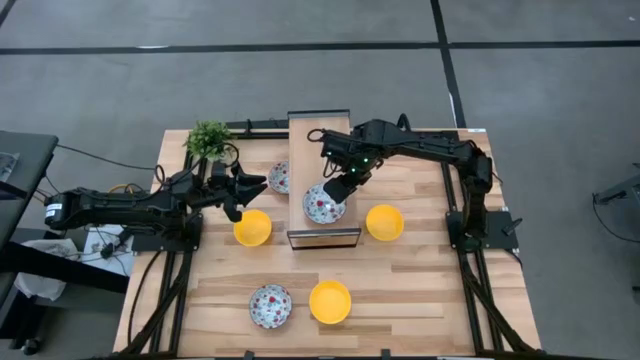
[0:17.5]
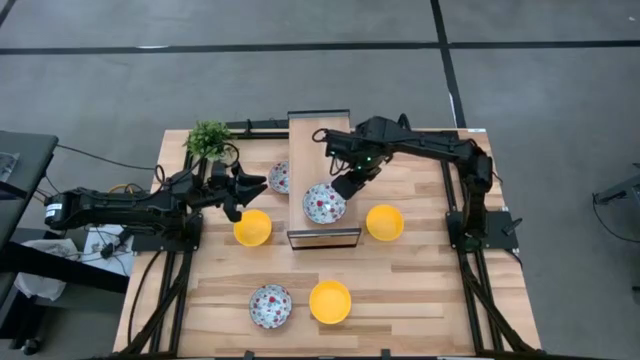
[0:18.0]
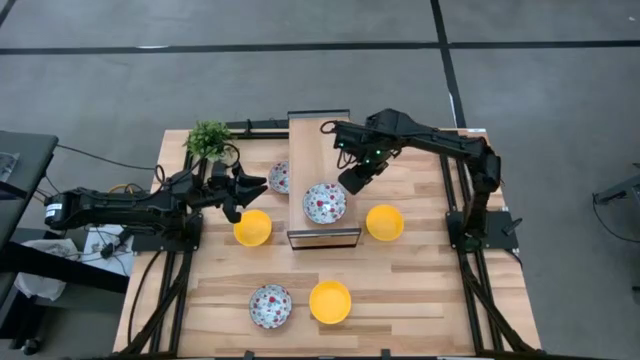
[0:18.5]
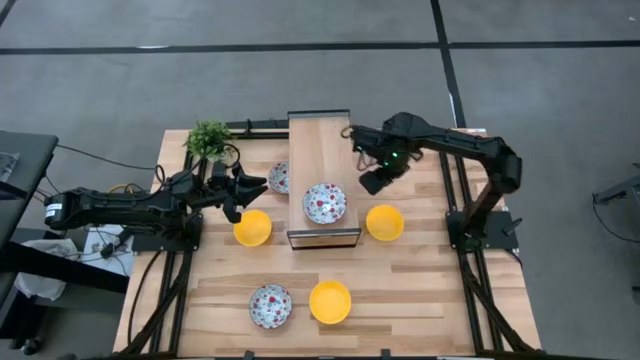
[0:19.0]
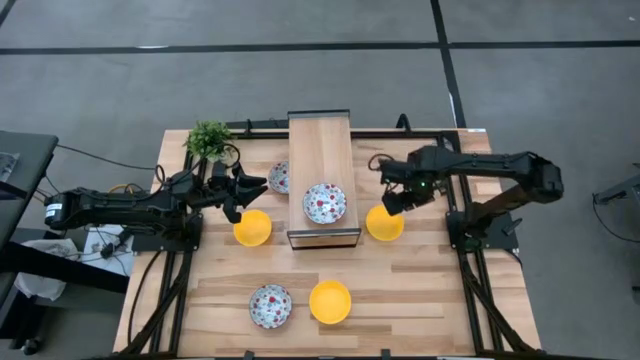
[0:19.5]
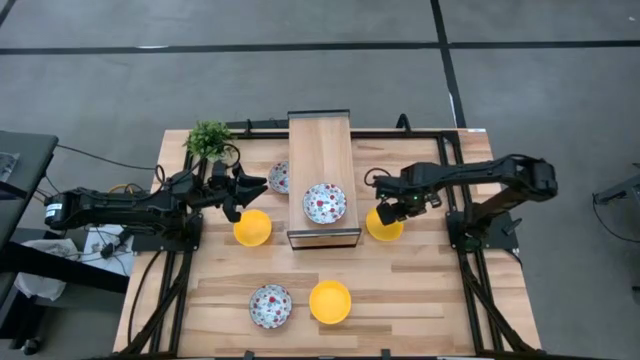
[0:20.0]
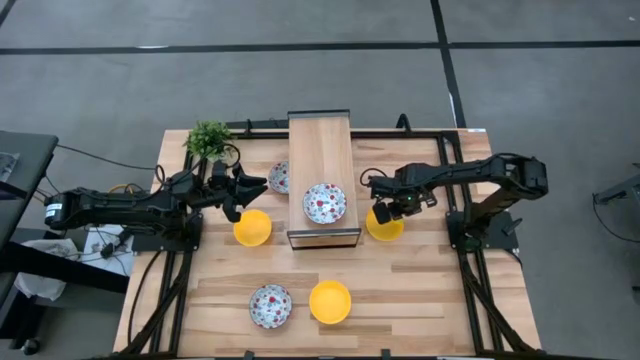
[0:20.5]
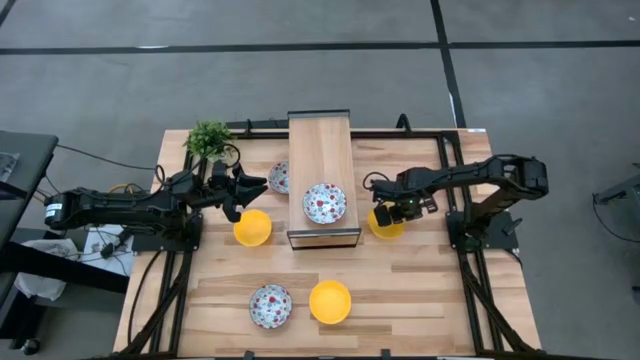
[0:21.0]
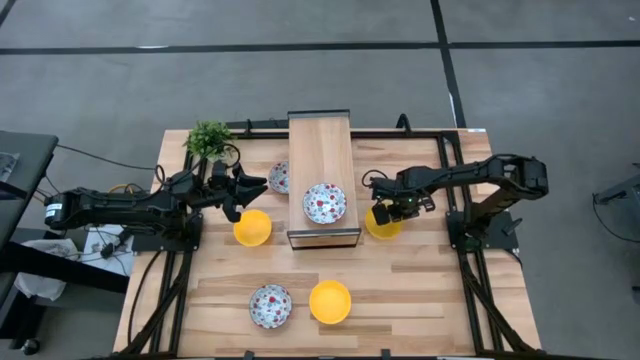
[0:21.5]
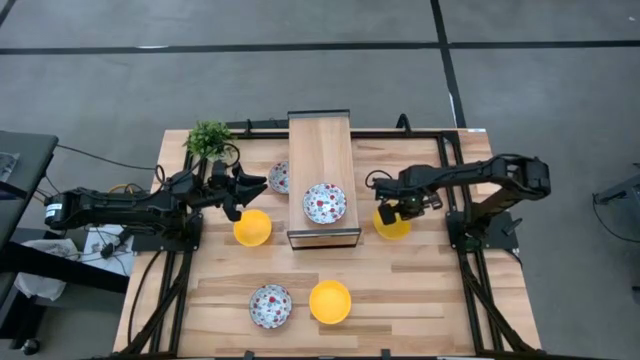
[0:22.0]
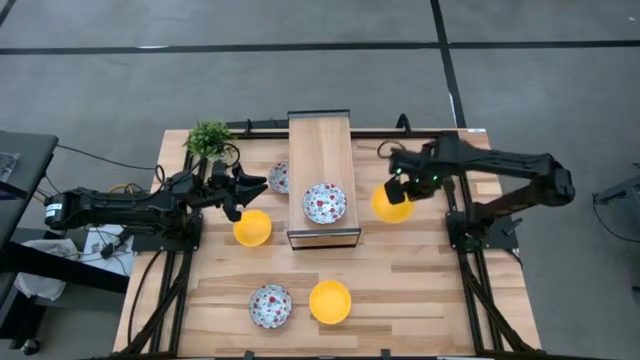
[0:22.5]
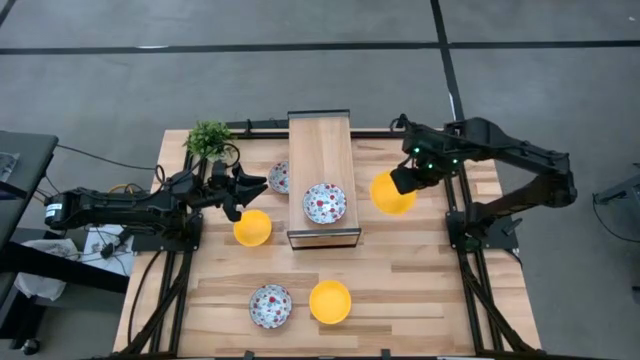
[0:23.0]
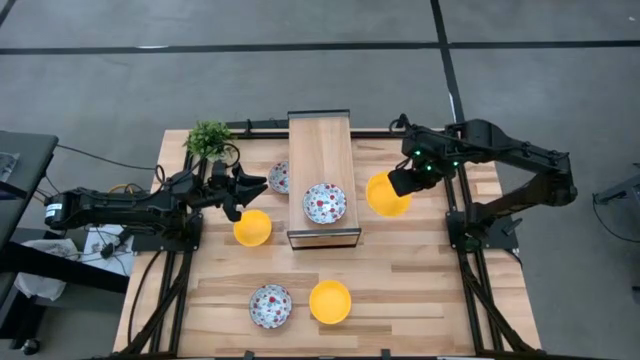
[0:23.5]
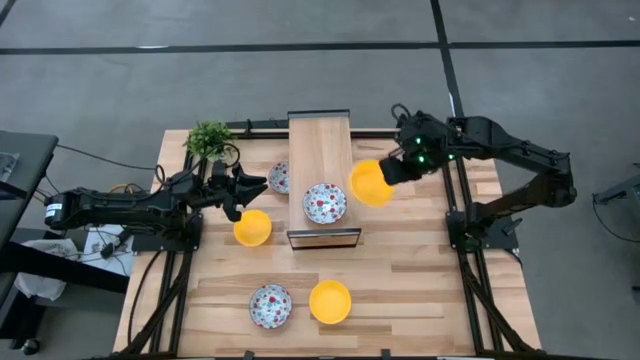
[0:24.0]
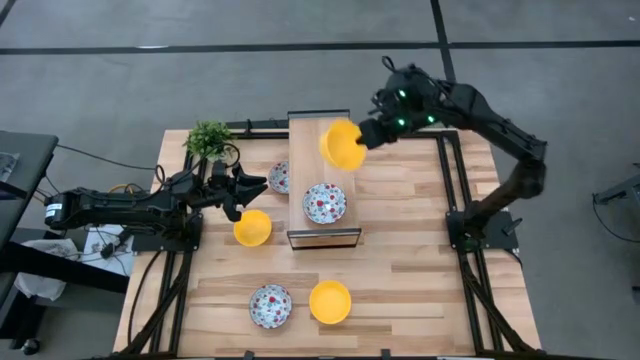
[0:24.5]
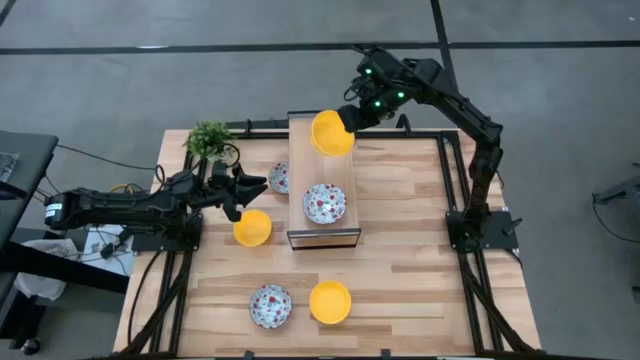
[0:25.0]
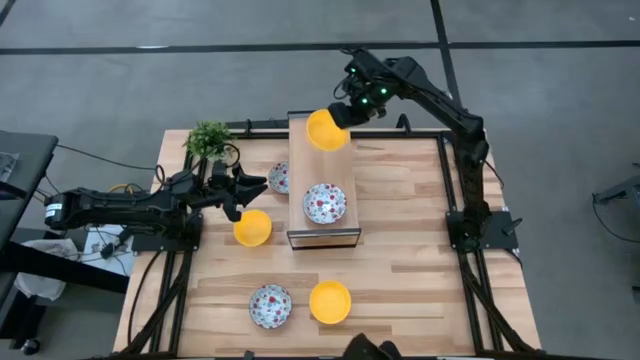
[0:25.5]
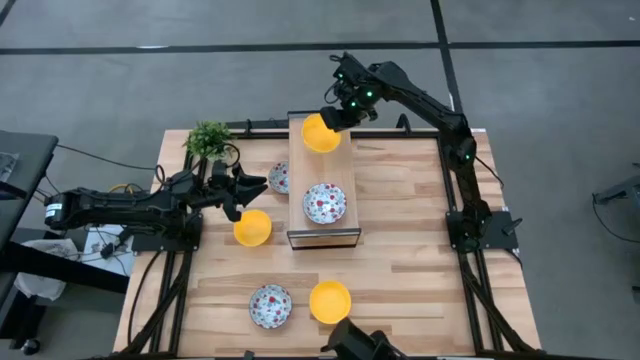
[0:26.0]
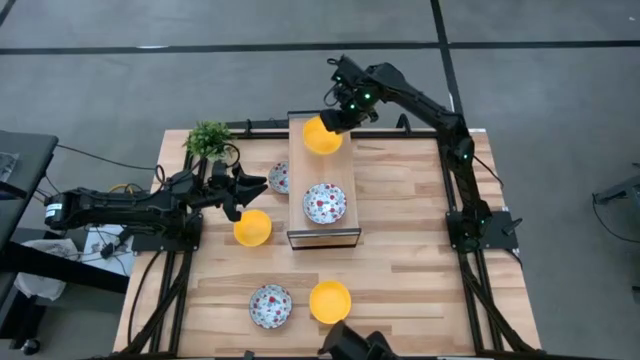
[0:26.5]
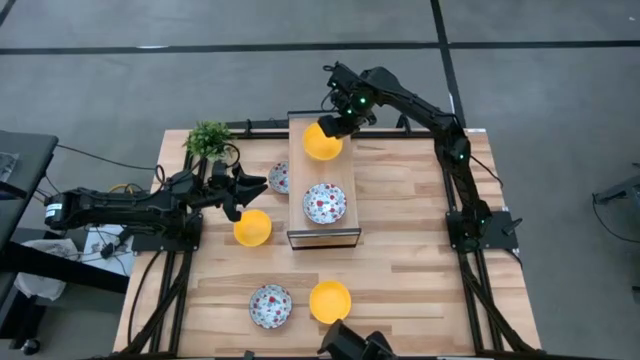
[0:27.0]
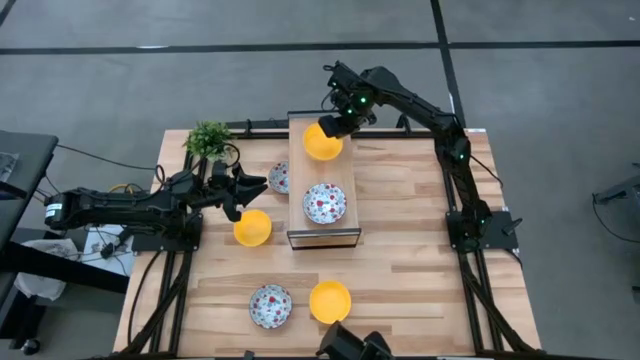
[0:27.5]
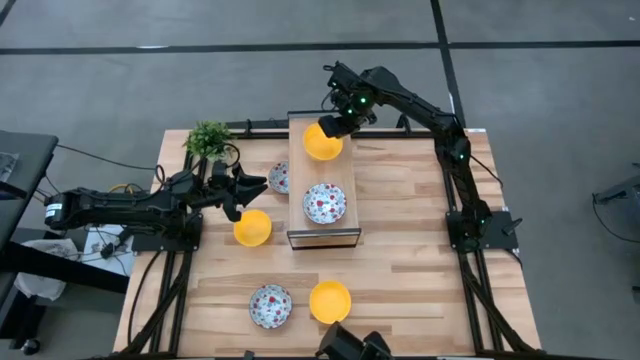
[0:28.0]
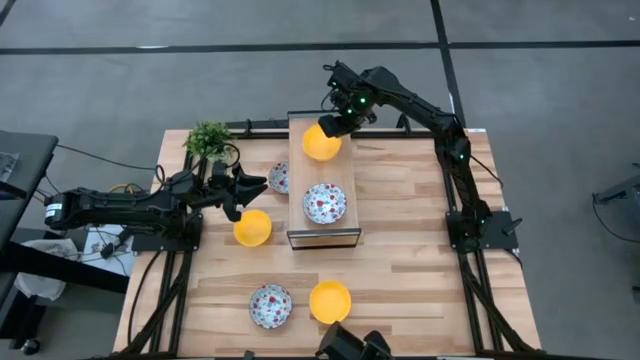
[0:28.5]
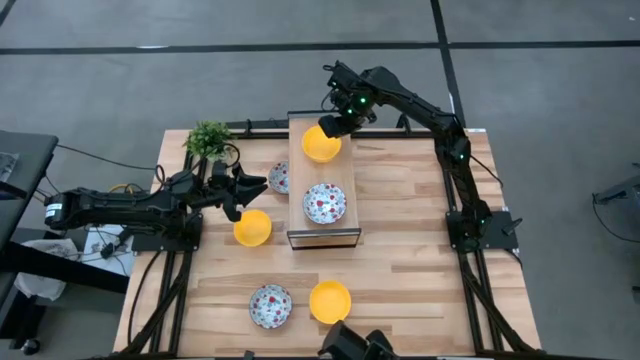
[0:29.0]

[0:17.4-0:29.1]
Task: Pick & Place Mini bowls
Put the right yellow bowl on the shelf

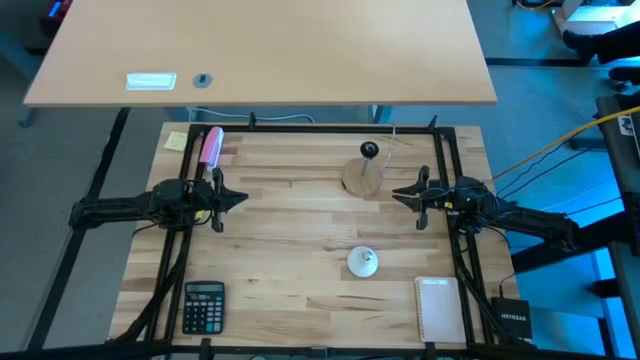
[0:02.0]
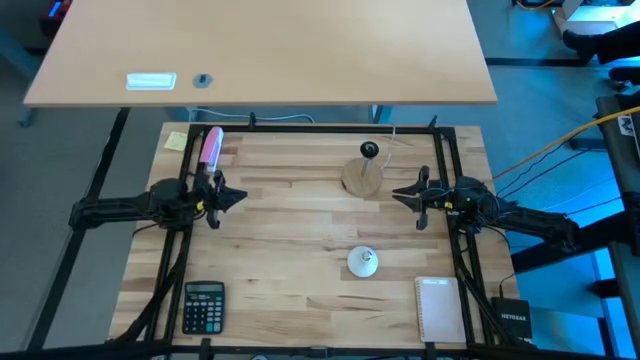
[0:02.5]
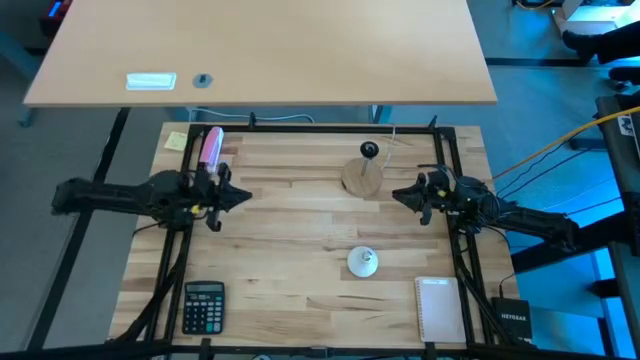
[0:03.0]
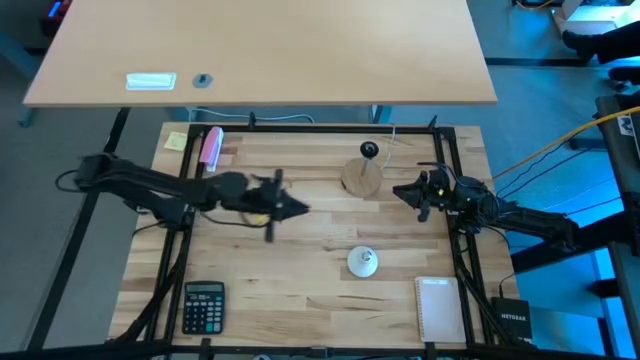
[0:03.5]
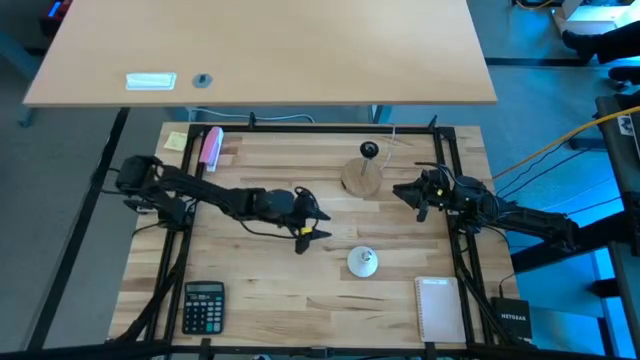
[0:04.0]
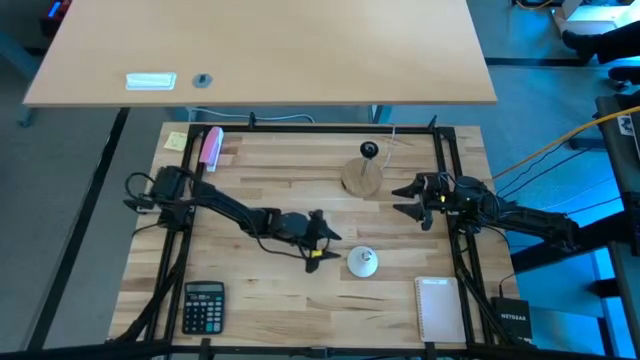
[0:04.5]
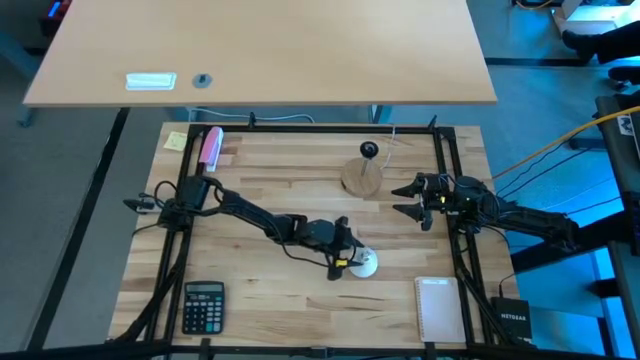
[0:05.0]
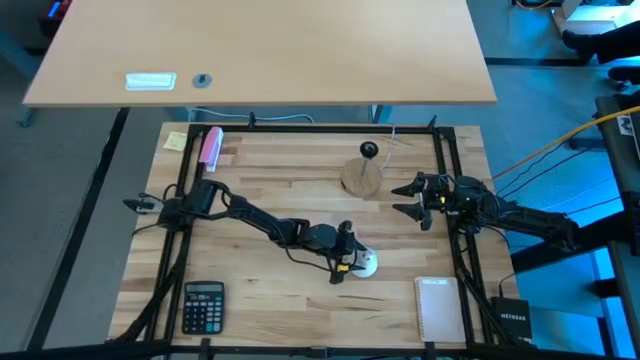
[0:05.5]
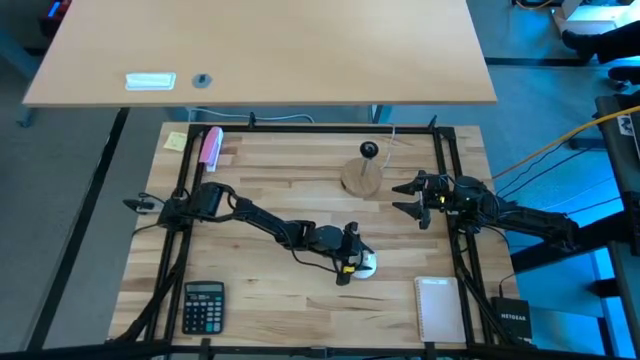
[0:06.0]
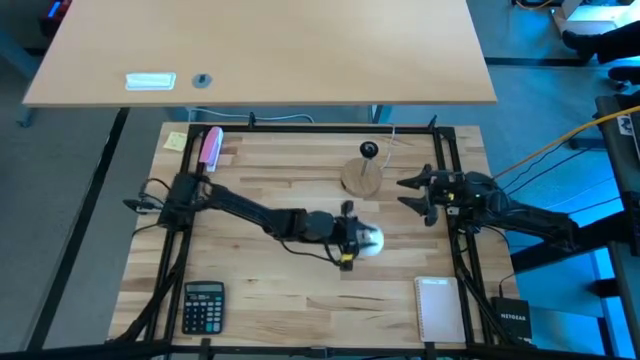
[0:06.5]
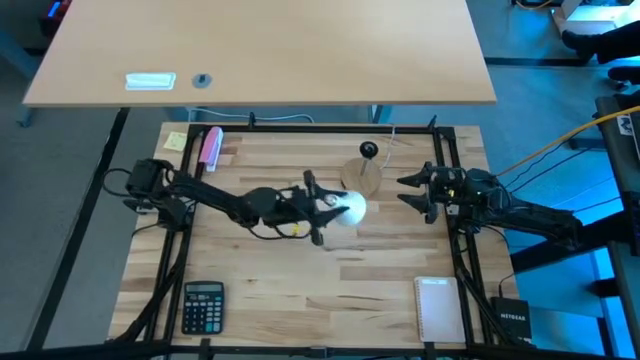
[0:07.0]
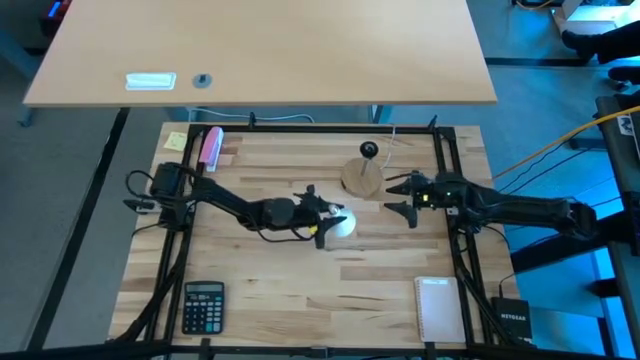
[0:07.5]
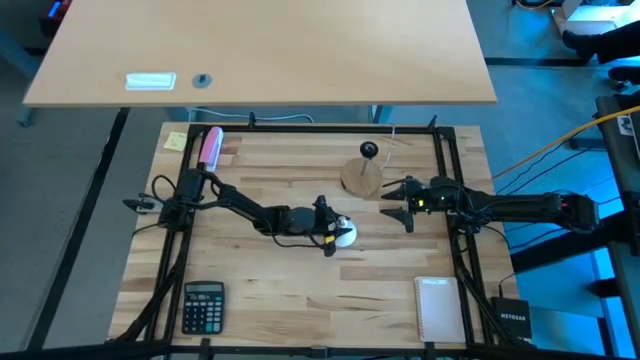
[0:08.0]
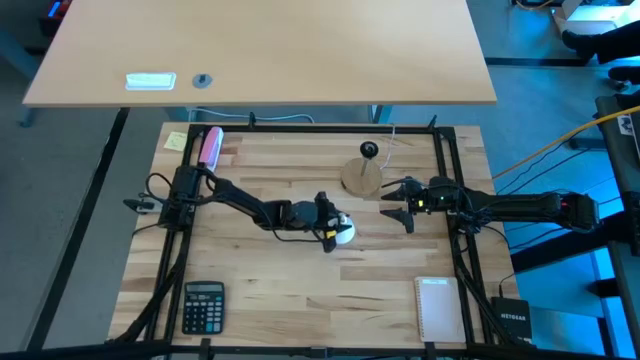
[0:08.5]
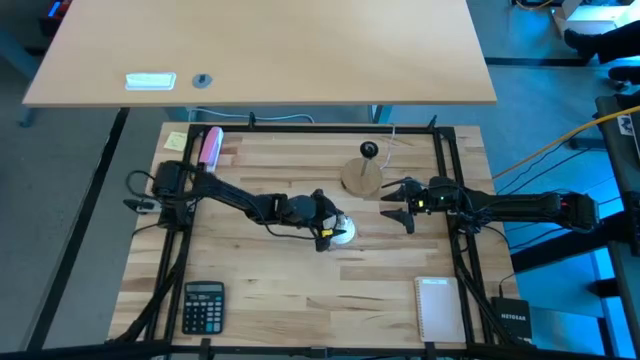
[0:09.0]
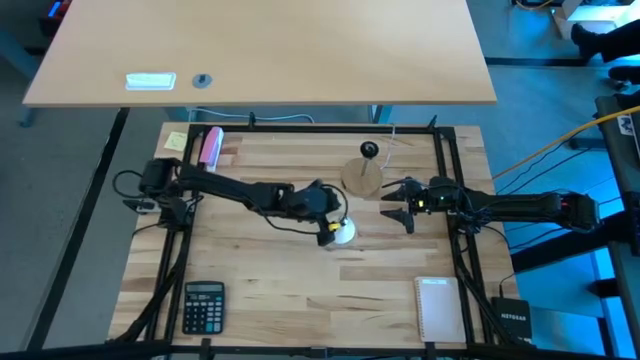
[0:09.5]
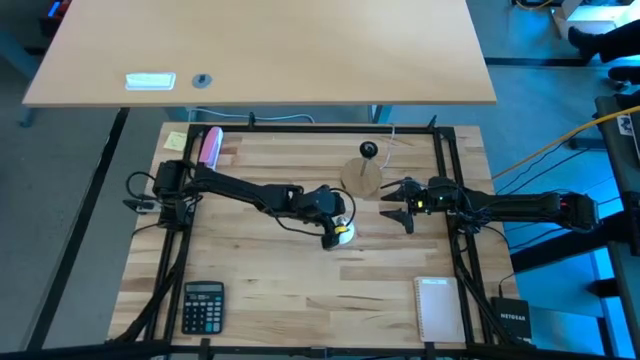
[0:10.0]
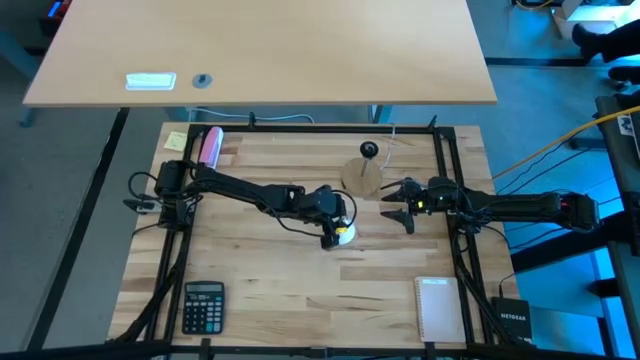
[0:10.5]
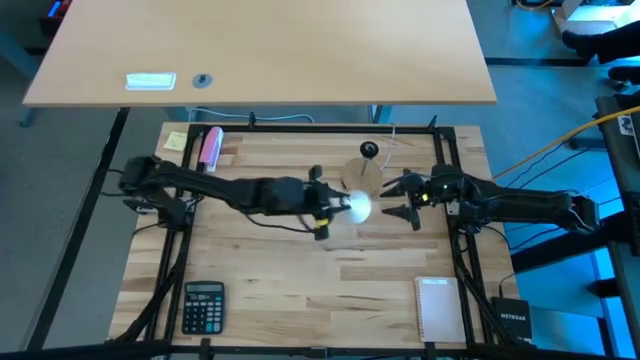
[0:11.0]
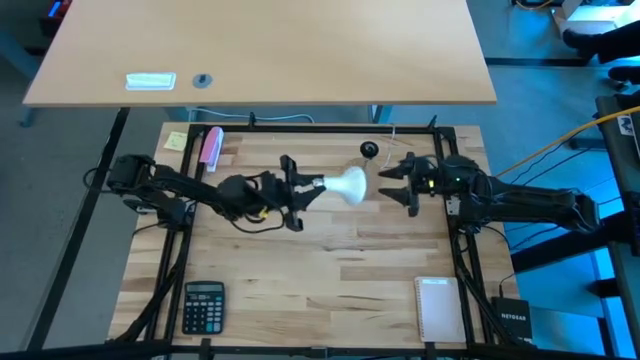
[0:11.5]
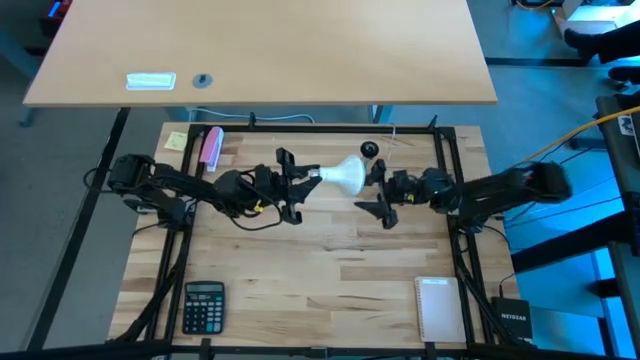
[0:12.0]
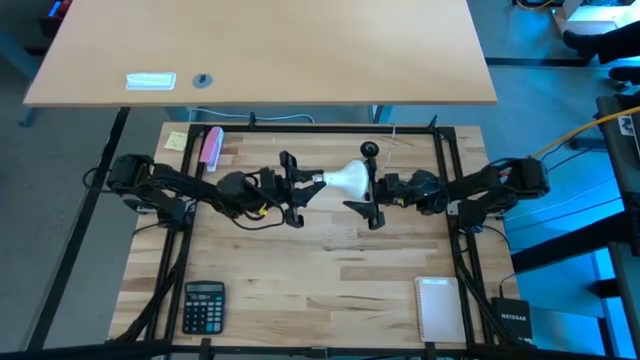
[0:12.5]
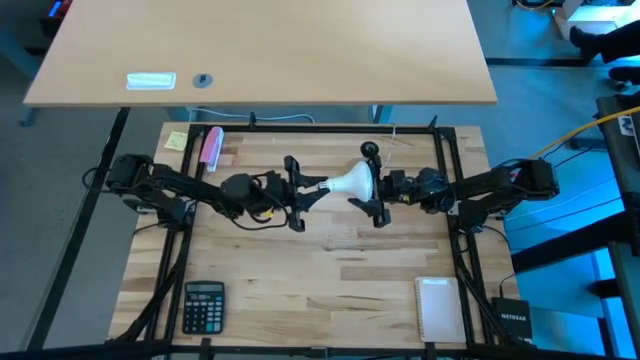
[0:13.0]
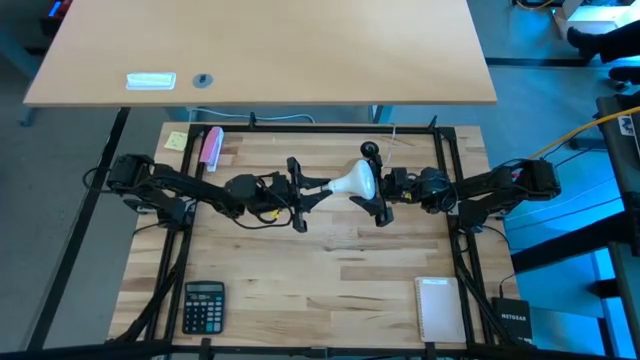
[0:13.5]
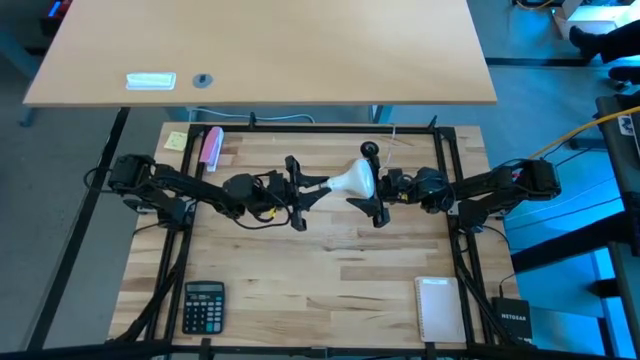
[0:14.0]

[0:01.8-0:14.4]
Task: Screw lightbulb
Insert the white lightbulb into the lamp
